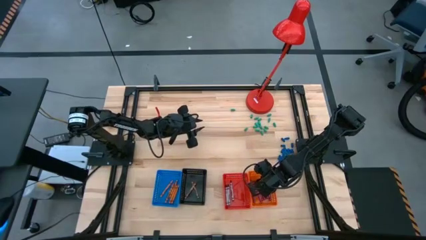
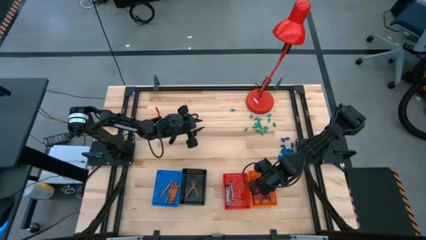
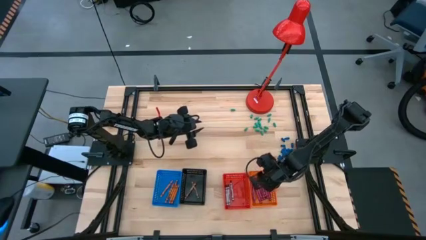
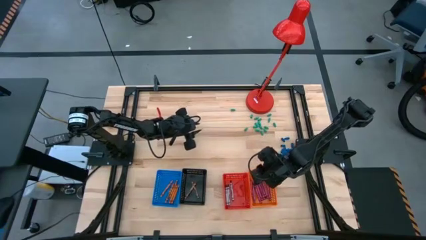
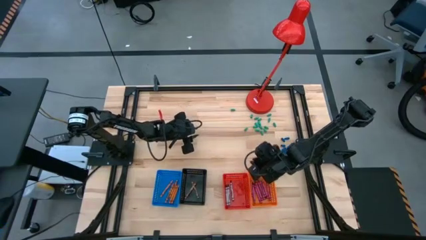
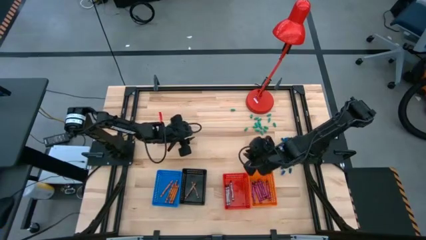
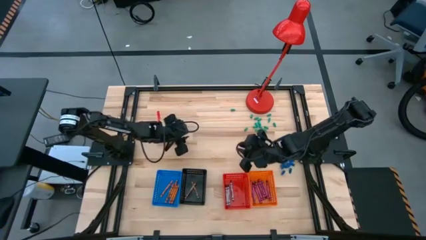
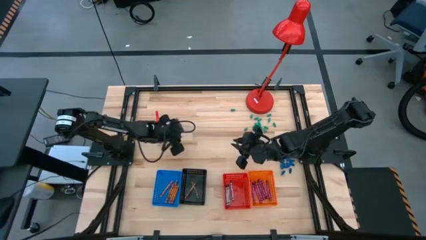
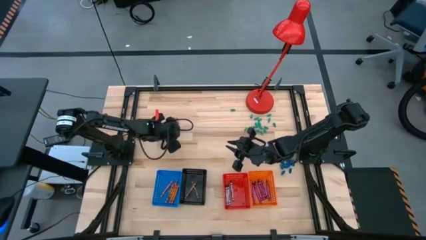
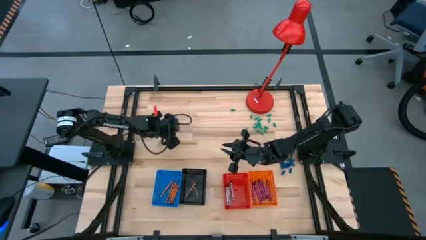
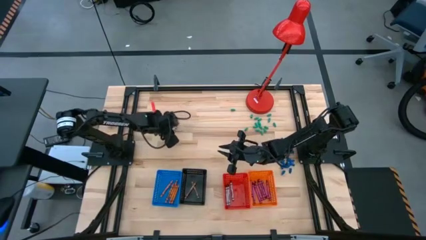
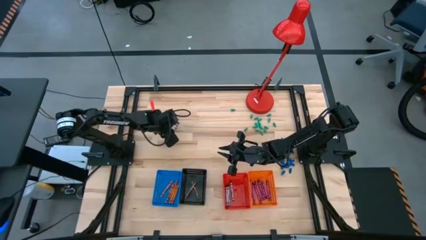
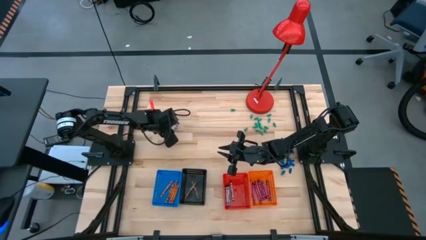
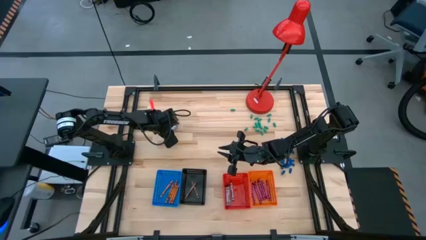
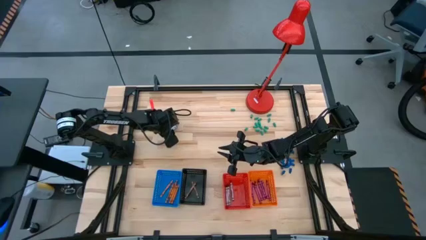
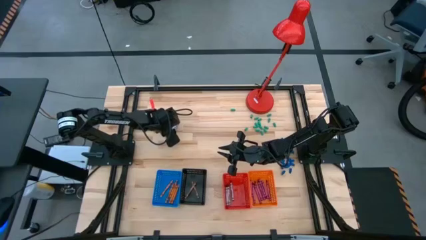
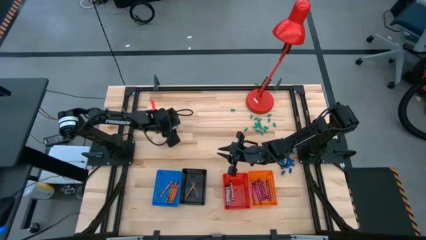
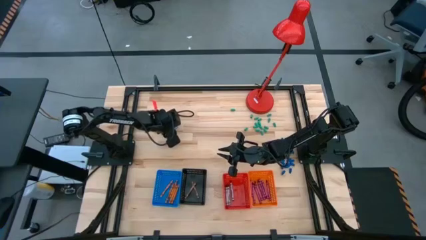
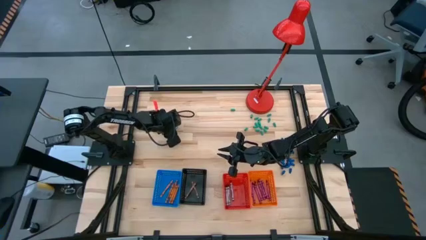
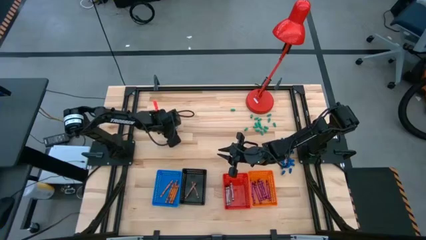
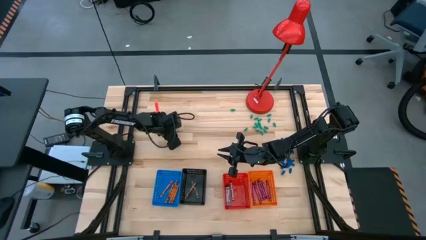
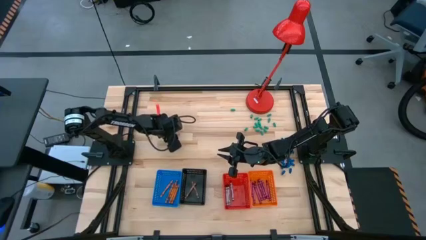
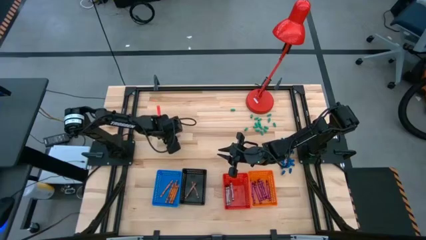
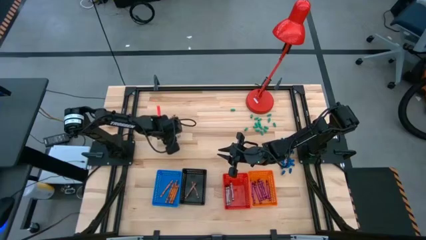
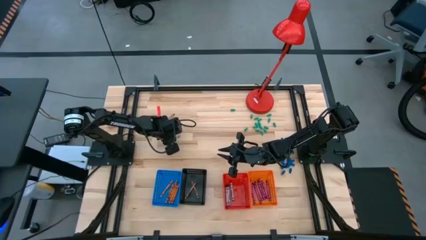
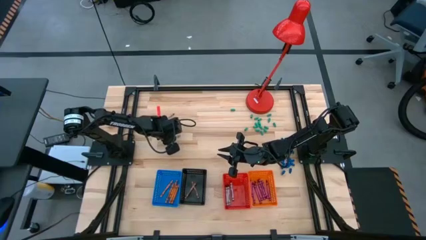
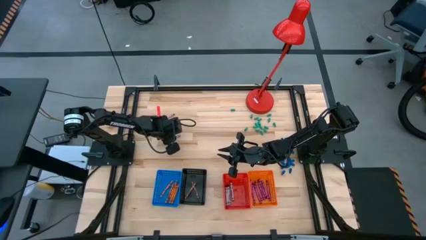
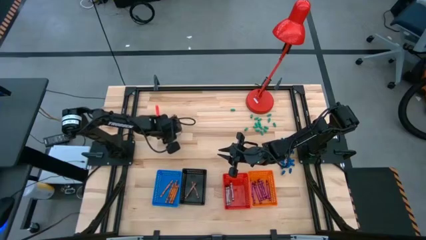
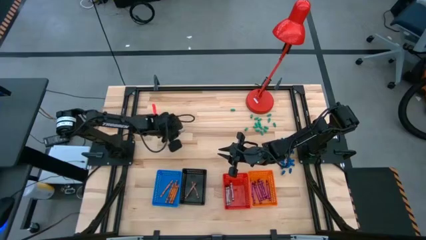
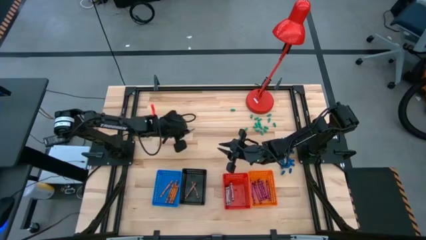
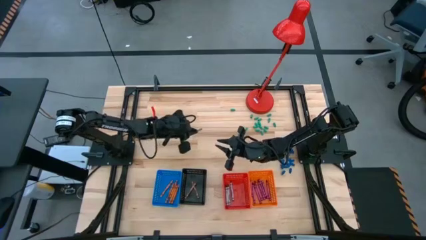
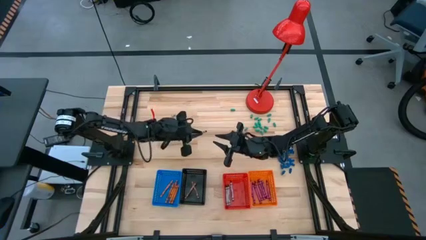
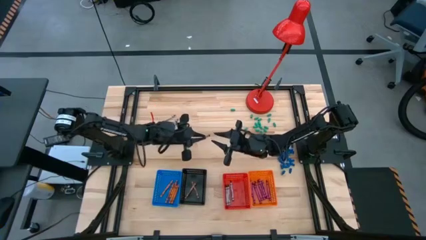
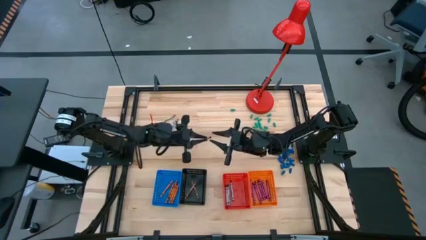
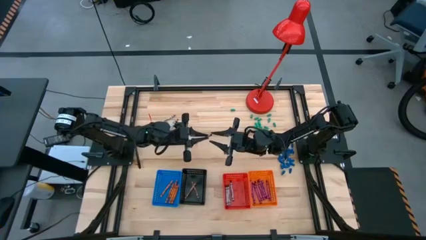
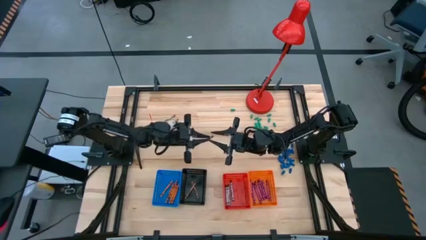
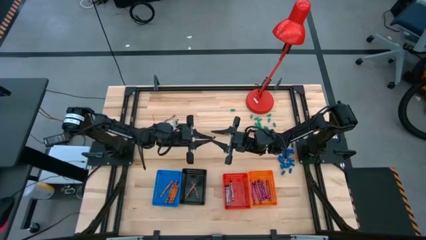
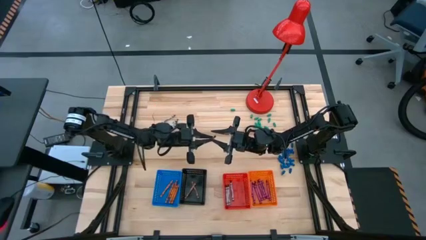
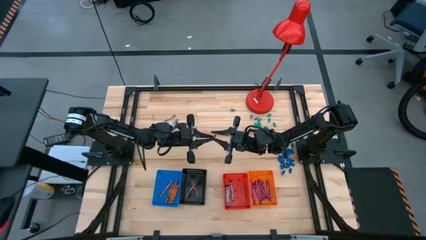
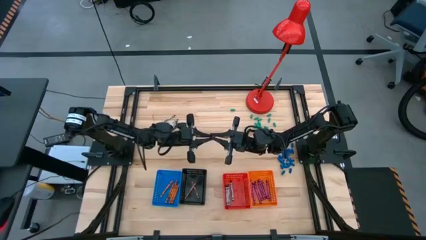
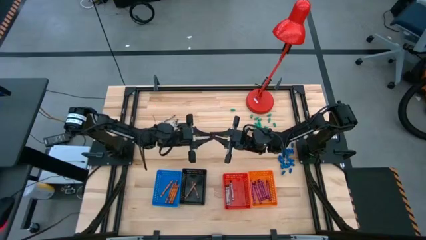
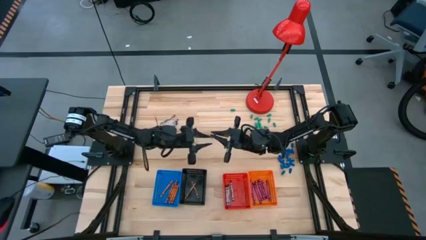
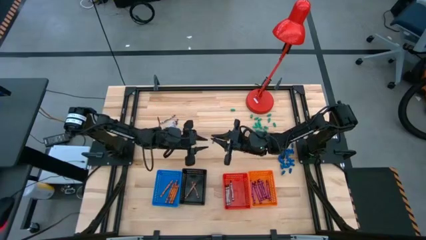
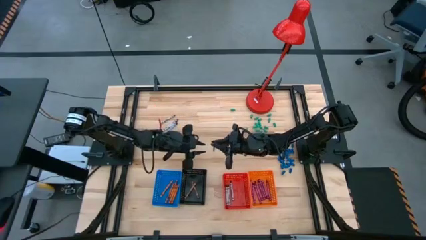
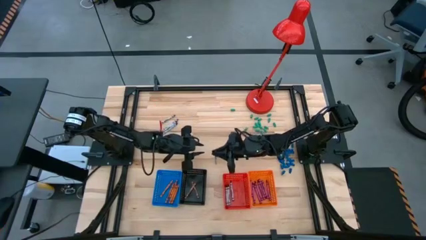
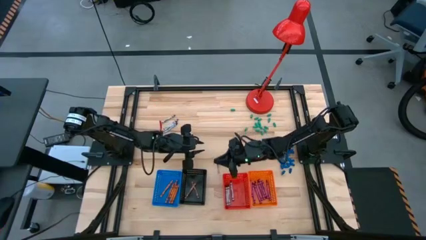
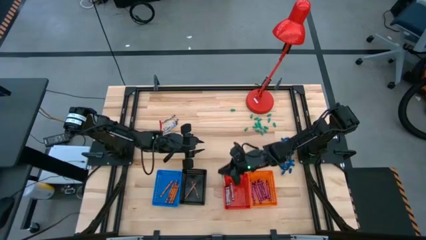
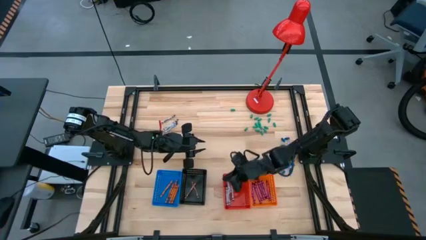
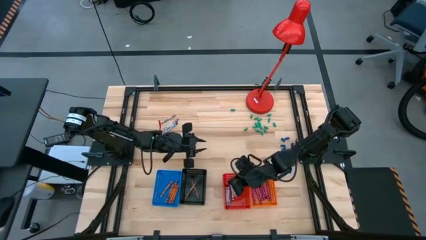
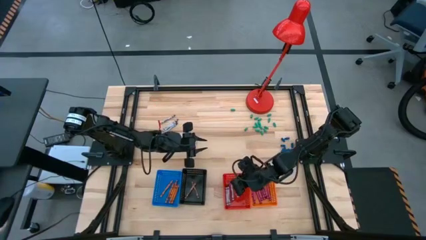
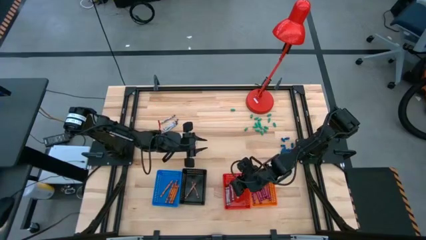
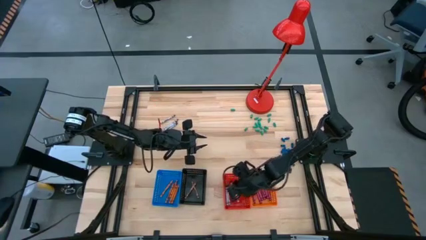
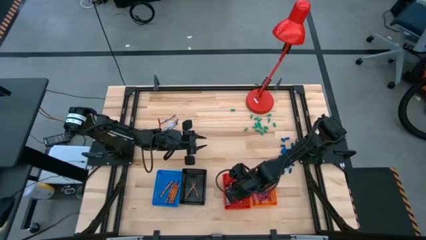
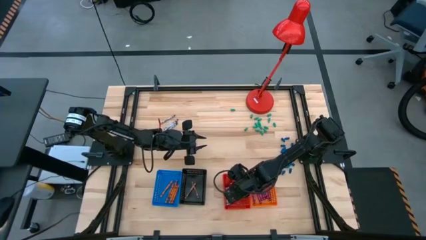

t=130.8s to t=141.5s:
Task: Sort crayons
Put the black crayon into the red basket

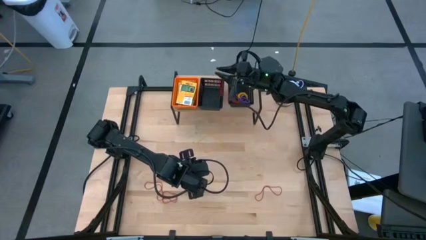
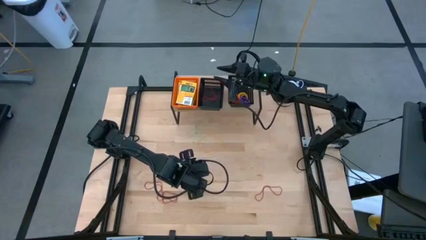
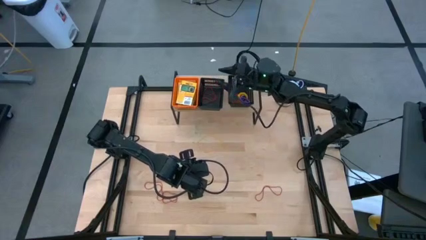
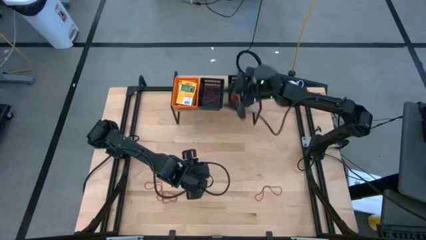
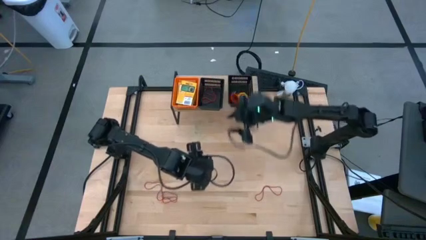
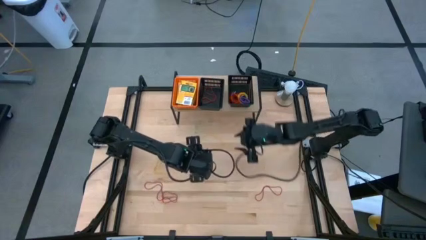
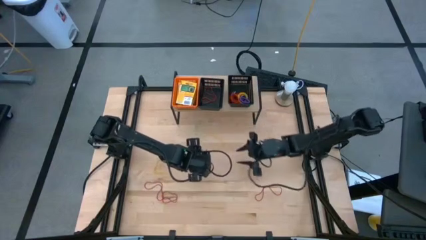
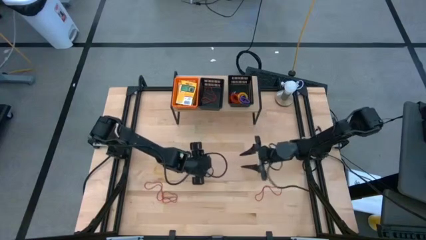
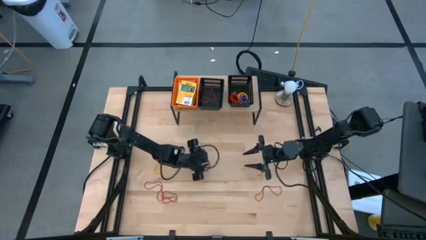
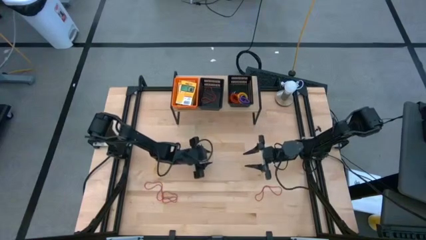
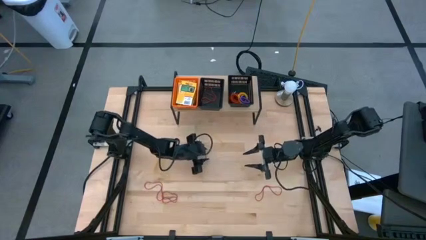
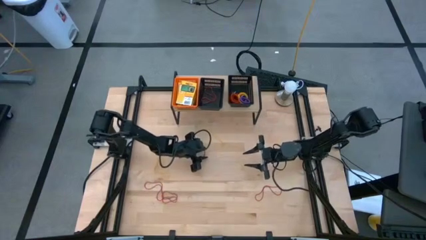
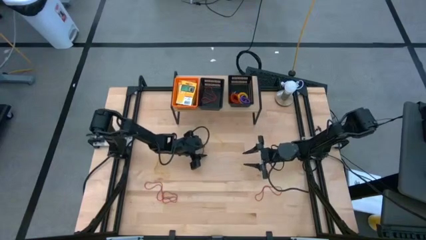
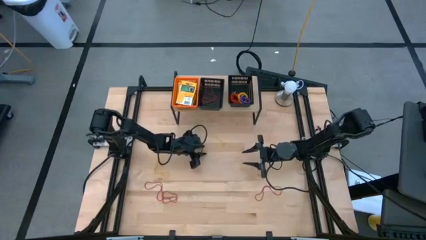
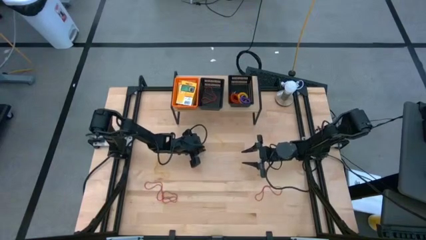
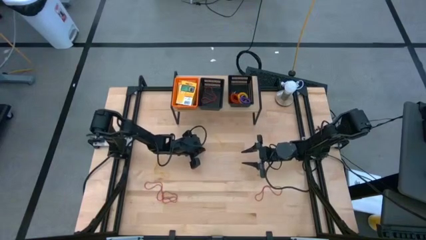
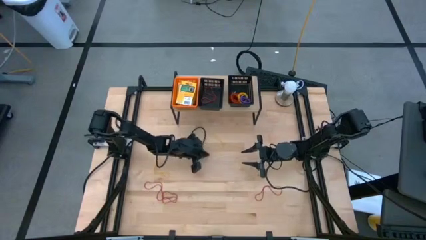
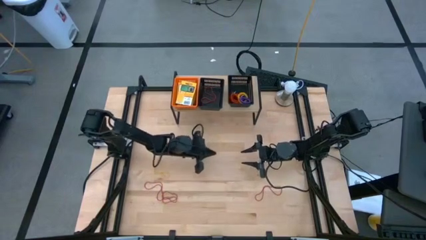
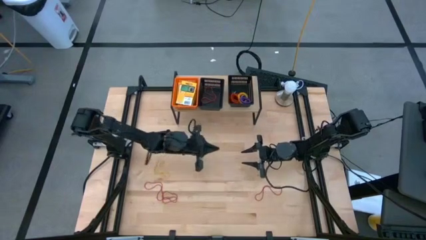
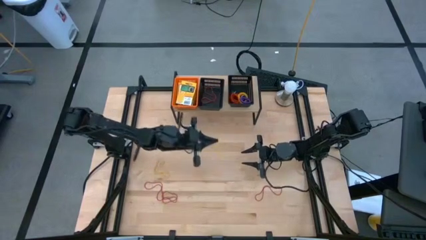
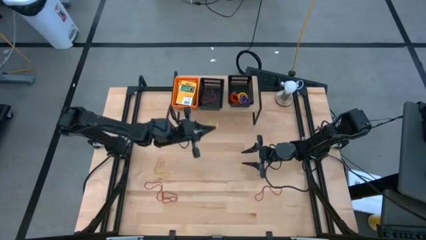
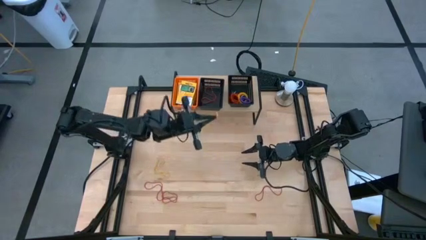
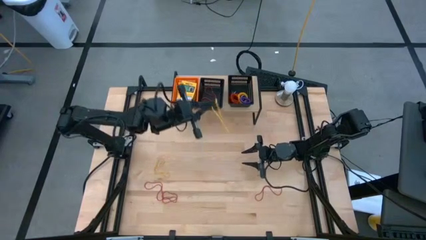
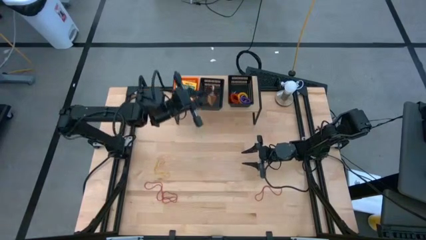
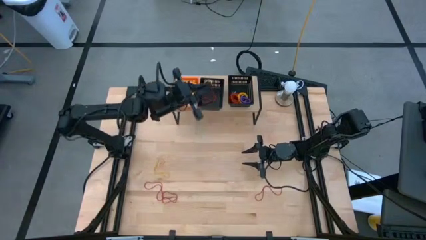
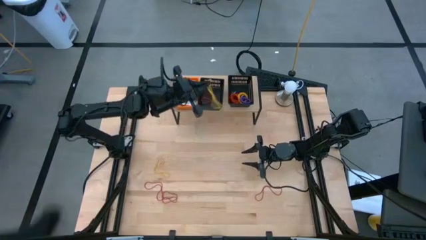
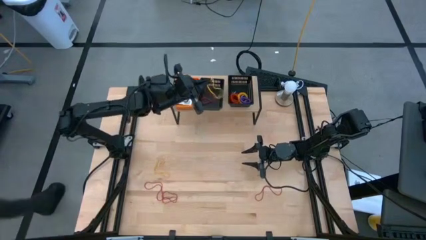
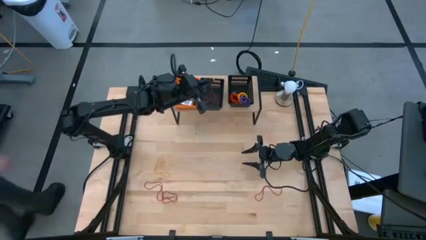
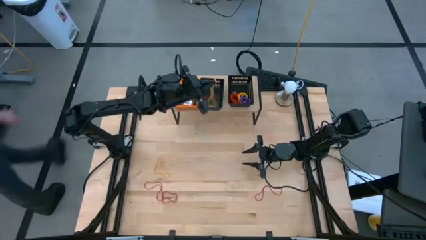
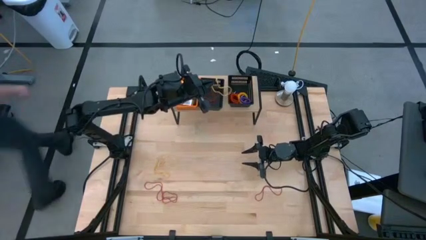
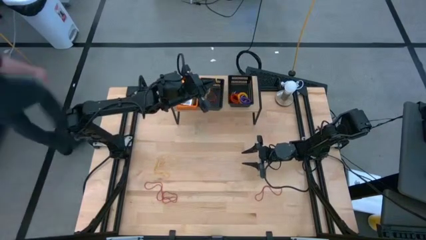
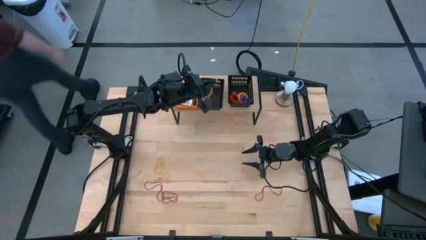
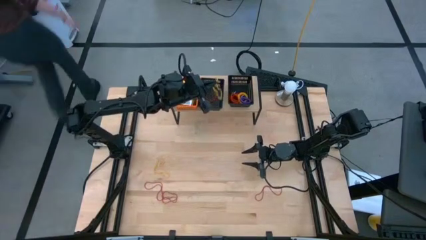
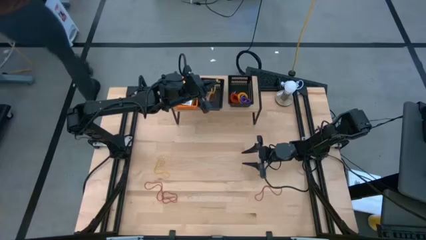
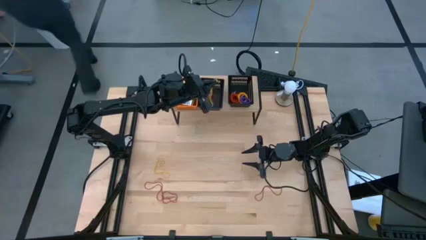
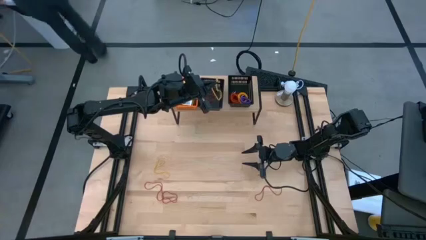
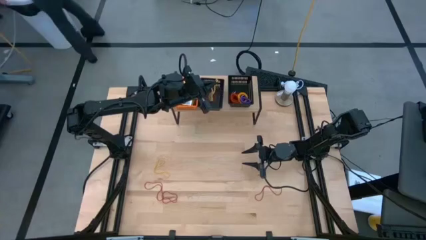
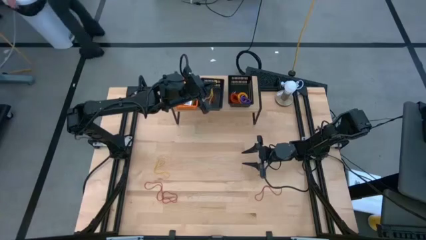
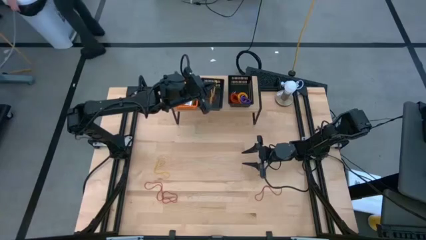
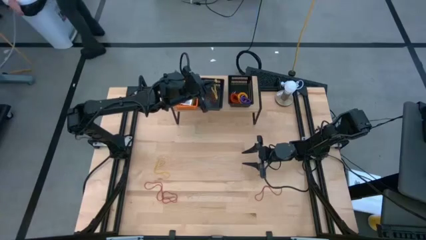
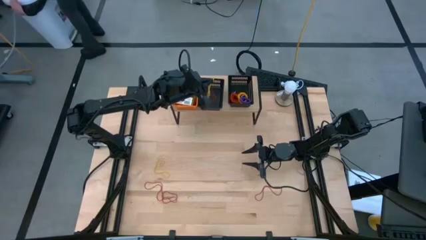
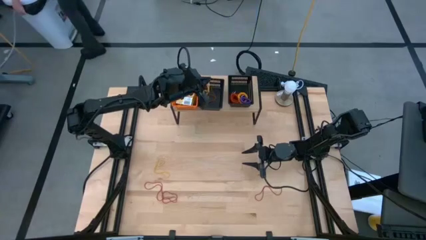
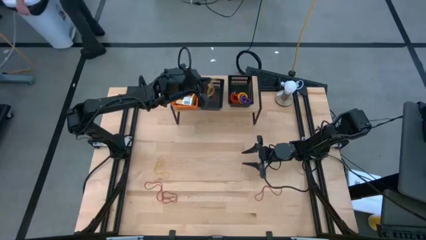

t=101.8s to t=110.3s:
Task: Pick & Place Office Desk Supplies
Put the yellow rubber band into the left black bin on the shelf
